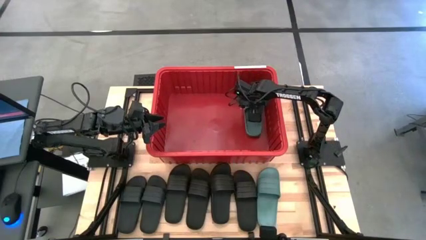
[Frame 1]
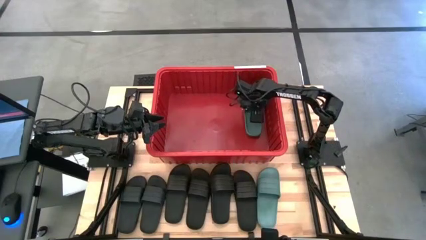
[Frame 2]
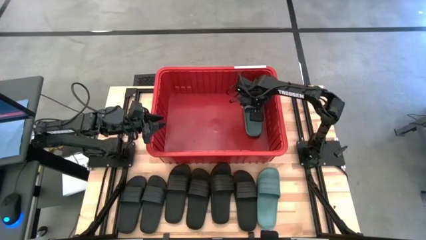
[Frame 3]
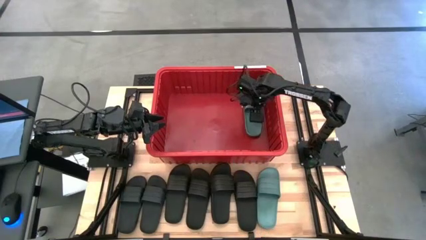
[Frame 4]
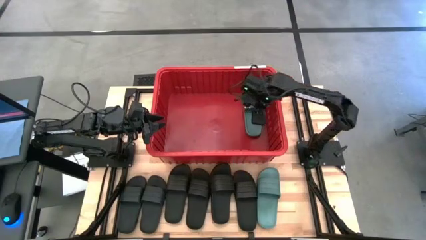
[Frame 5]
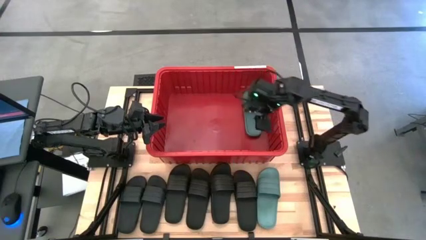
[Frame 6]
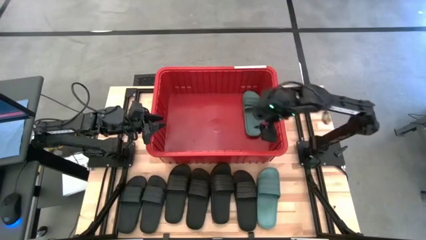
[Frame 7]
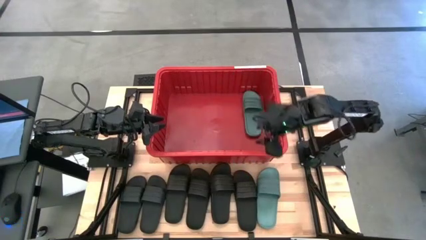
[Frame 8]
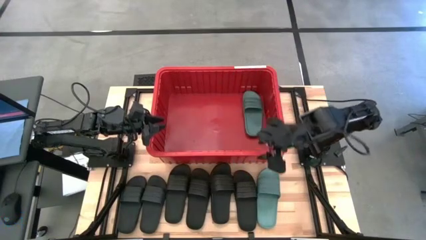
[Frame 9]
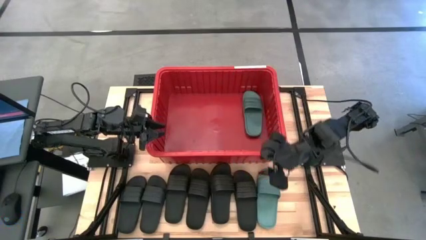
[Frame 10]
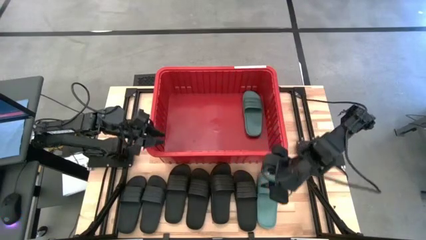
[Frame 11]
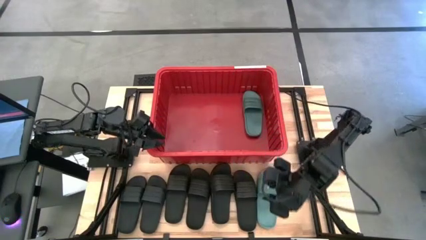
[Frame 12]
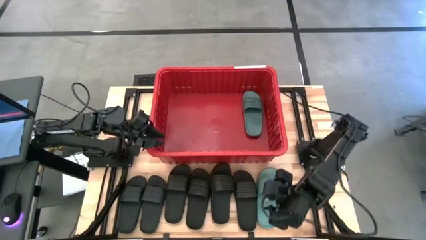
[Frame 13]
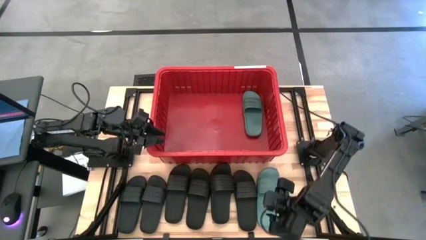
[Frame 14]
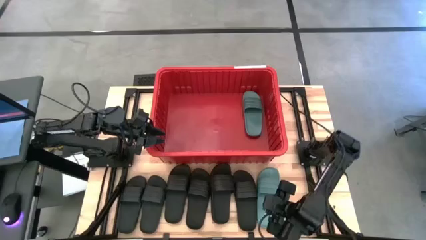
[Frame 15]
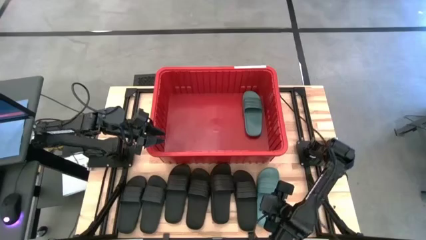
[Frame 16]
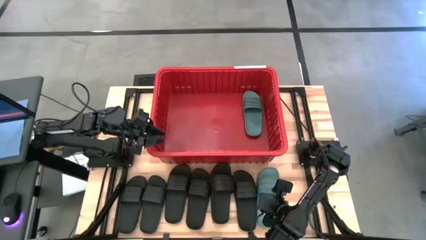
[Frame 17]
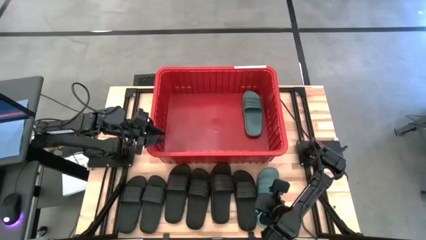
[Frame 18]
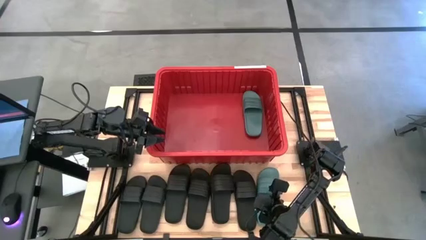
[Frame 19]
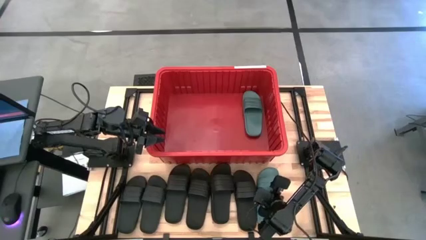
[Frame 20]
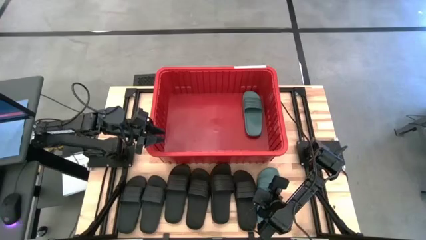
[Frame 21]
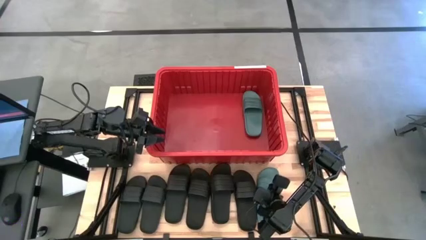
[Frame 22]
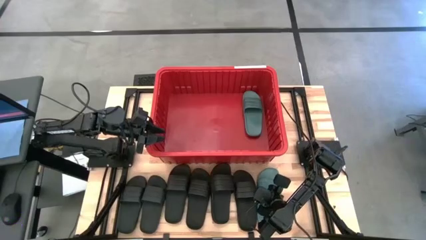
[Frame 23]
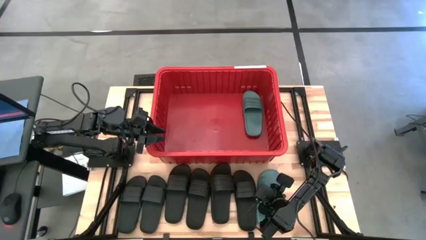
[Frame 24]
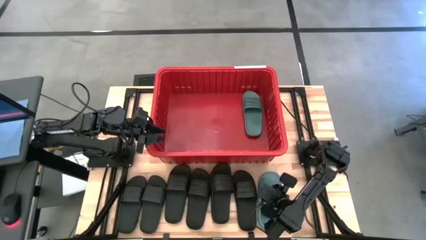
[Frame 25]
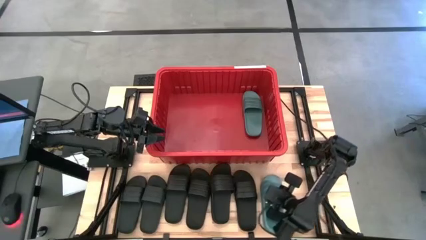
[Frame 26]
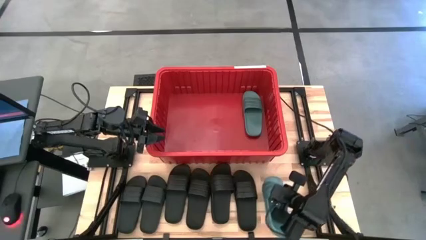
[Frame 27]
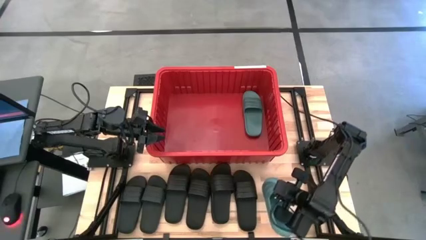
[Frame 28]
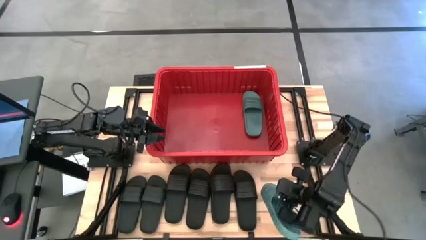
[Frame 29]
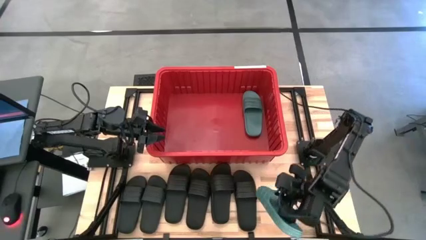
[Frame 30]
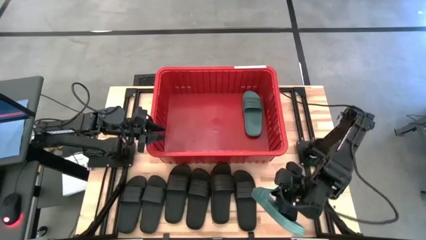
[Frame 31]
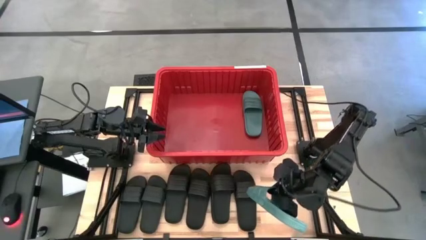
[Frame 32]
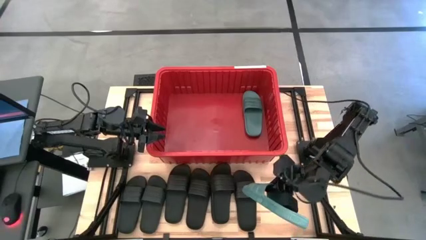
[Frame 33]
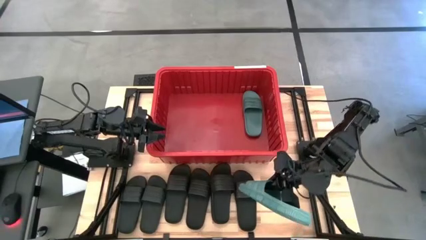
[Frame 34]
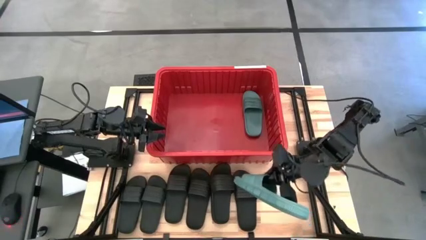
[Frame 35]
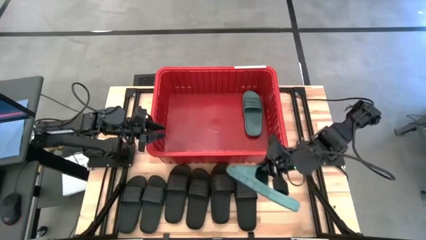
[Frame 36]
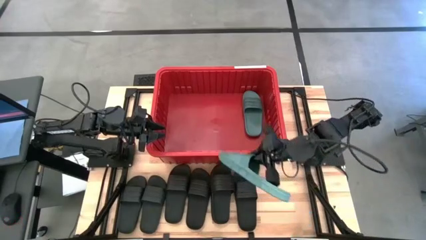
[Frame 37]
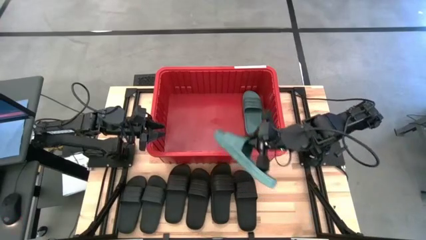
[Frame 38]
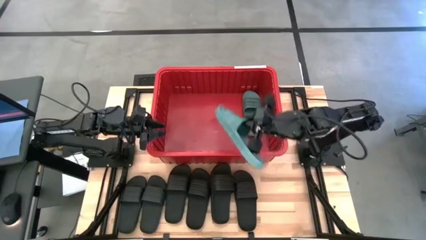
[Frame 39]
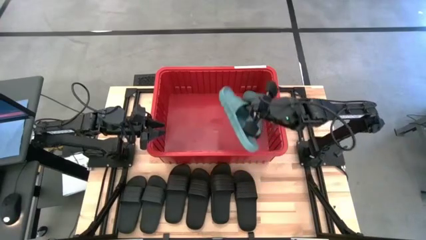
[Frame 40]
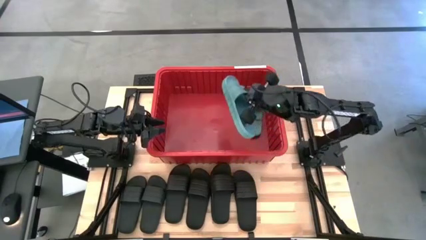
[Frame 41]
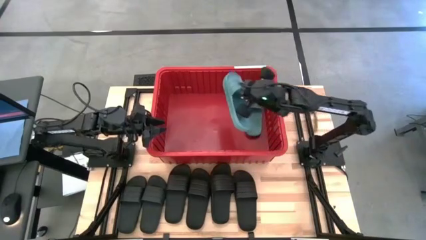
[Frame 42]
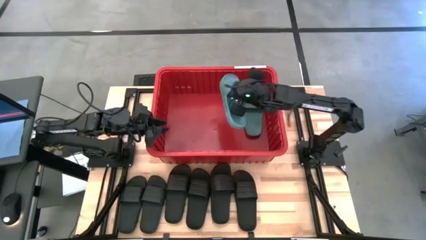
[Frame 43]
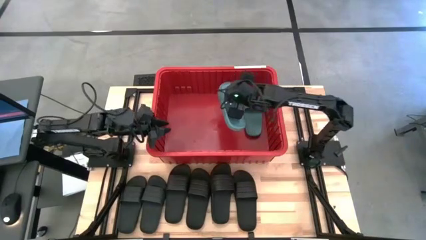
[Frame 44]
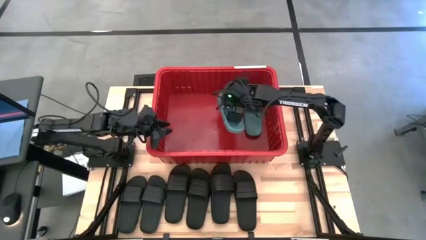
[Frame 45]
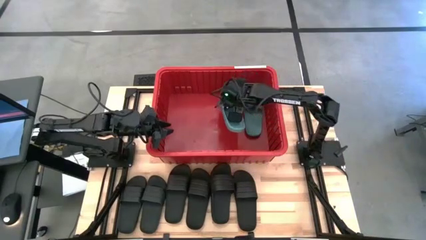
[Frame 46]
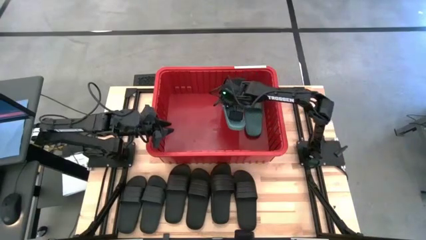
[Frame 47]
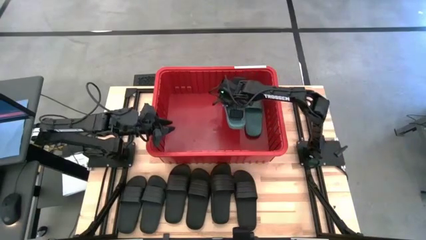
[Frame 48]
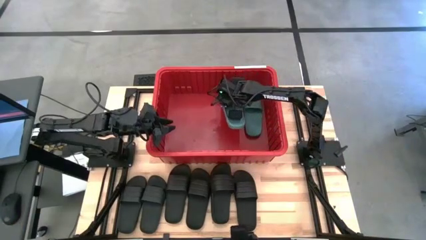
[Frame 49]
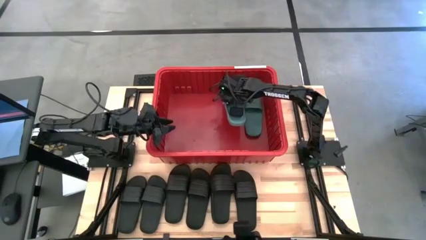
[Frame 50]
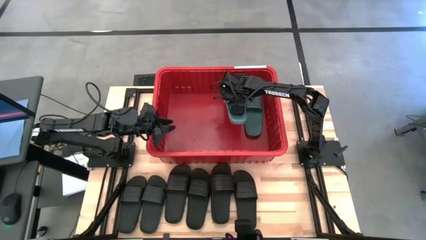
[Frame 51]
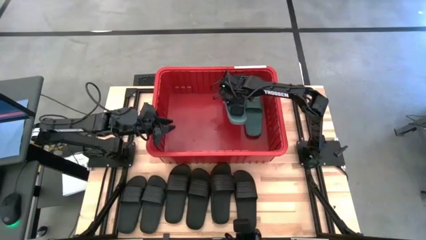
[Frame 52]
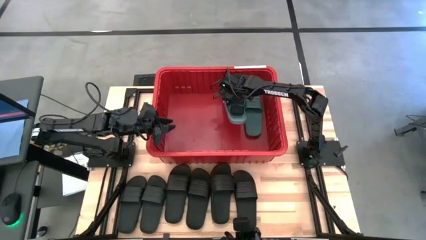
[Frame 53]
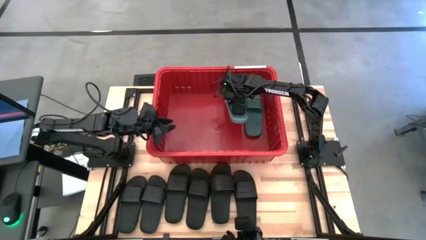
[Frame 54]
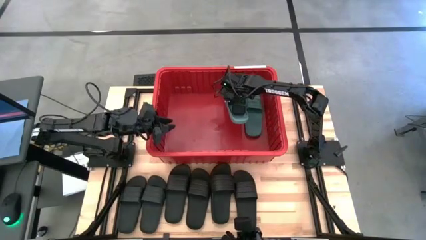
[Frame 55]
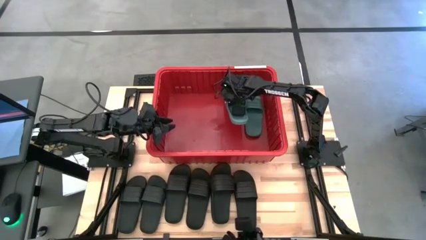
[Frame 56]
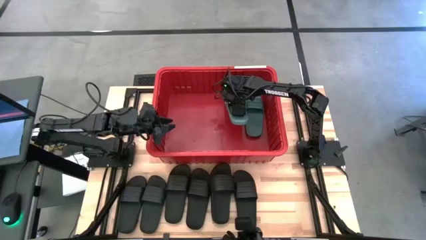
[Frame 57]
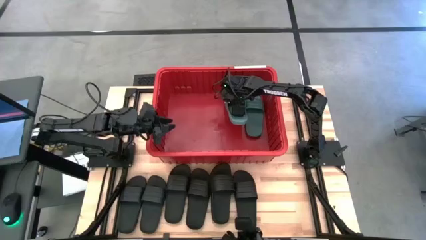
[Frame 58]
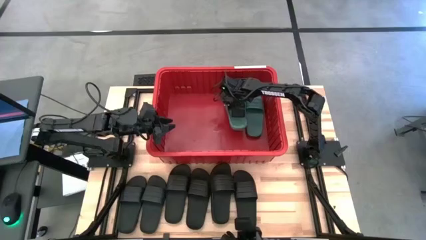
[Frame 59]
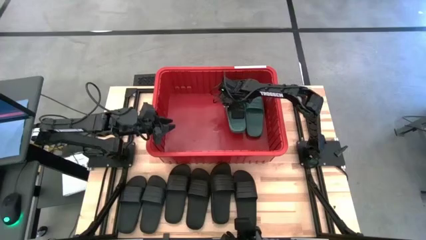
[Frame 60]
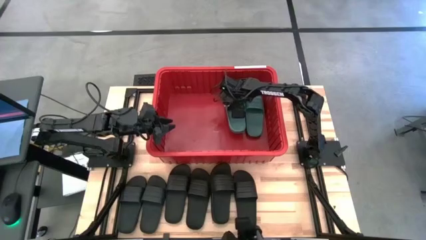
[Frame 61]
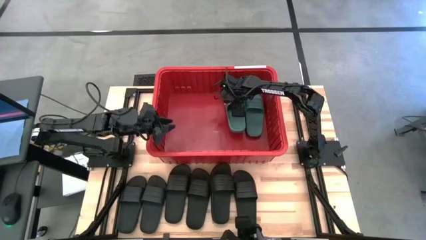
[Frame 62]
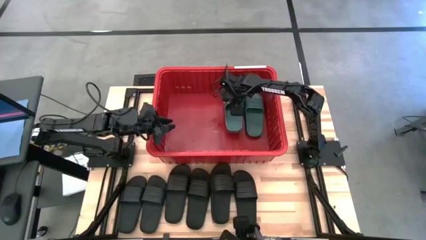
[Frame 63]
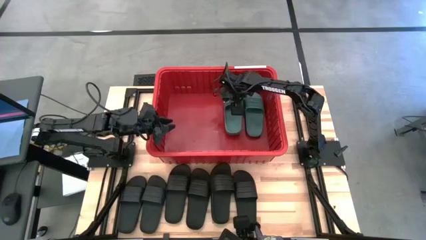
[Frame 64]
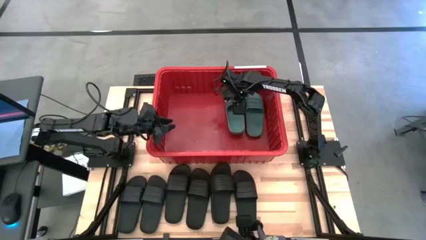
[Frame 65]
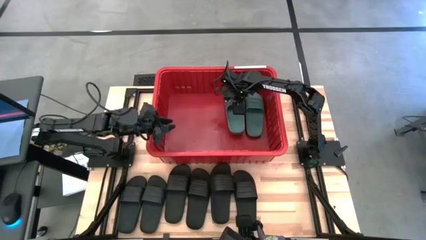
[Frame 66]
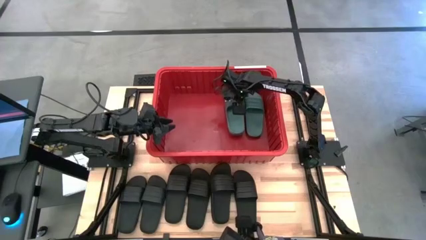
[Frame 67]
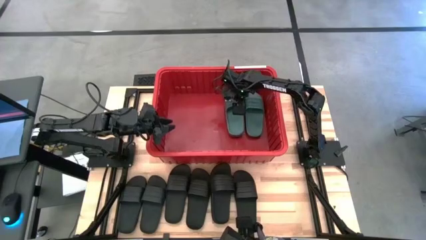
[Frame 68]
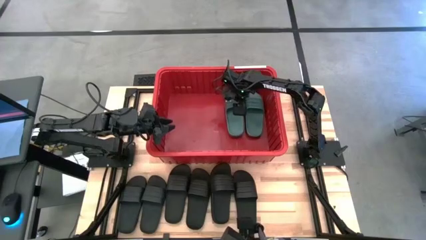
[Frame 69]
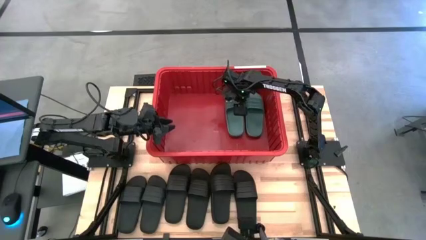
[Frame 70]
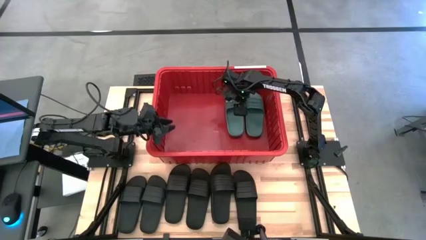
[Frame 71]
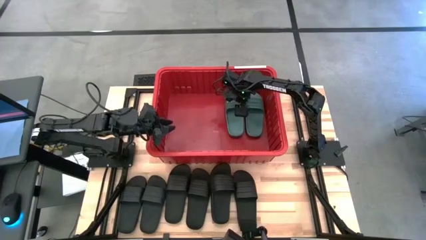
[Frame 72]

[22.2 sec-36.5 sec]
Task: Pick and place slides into bin
Put the light green slipper into the red organizer bin
